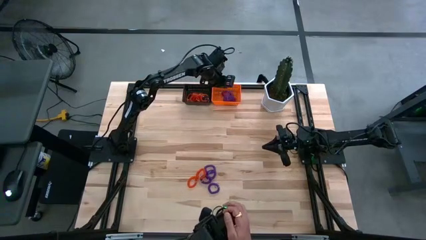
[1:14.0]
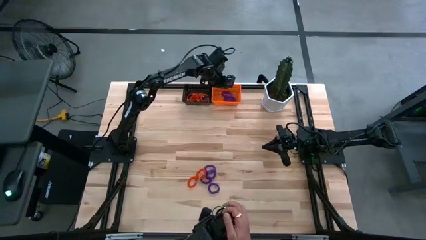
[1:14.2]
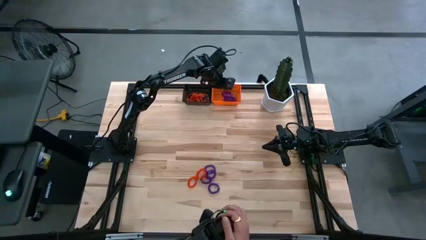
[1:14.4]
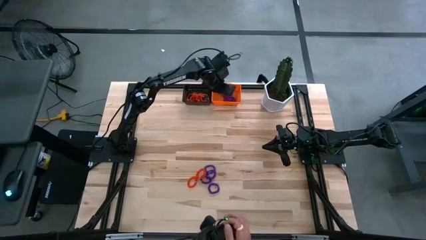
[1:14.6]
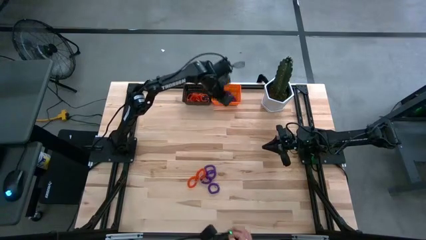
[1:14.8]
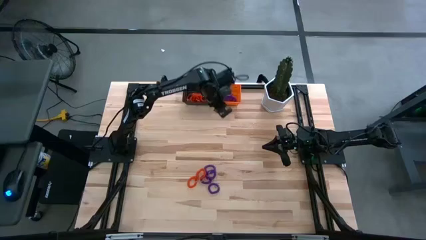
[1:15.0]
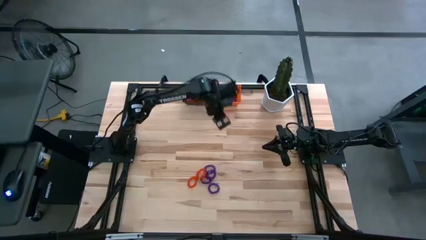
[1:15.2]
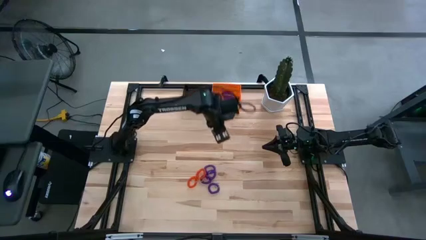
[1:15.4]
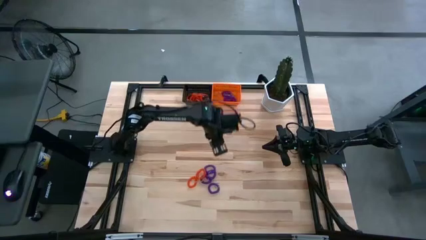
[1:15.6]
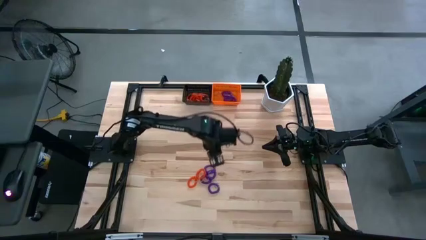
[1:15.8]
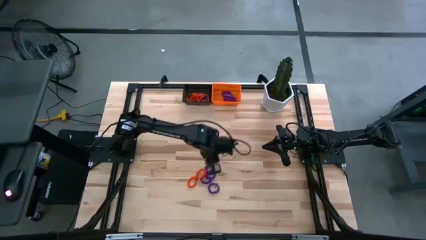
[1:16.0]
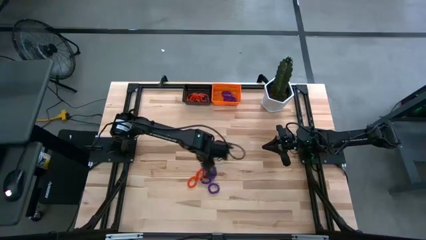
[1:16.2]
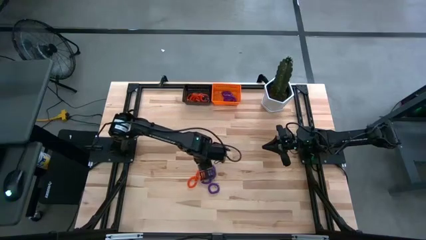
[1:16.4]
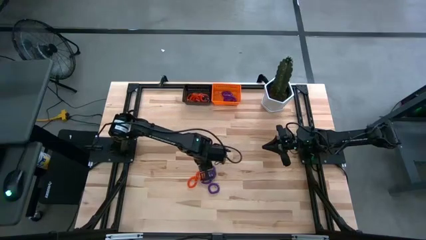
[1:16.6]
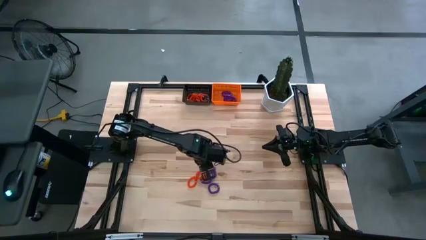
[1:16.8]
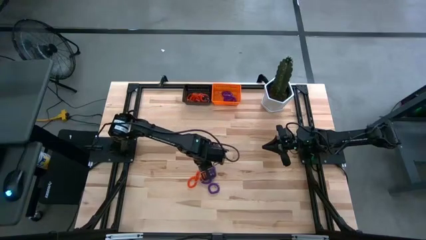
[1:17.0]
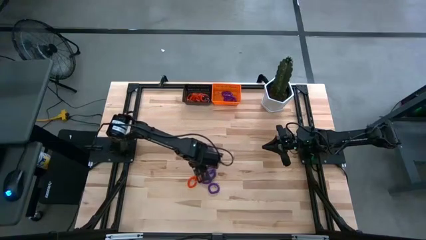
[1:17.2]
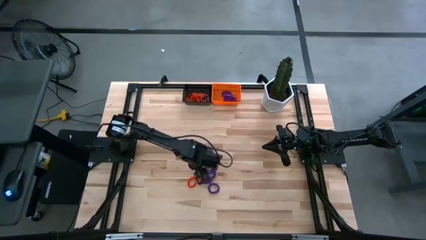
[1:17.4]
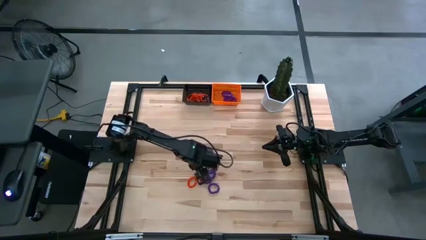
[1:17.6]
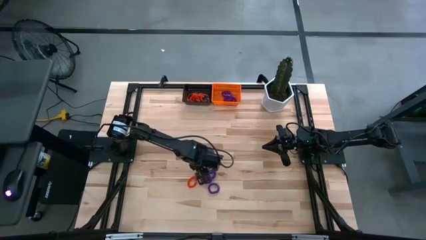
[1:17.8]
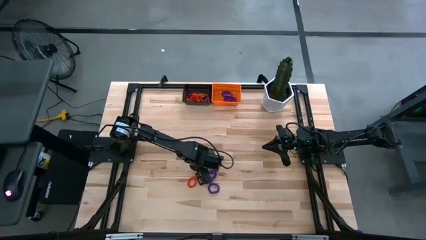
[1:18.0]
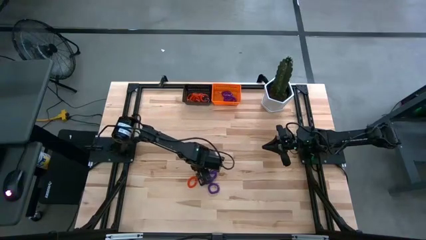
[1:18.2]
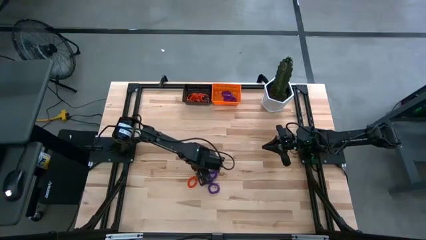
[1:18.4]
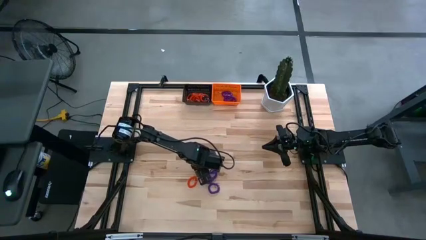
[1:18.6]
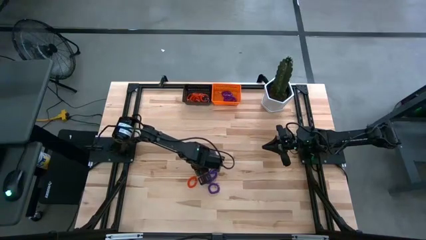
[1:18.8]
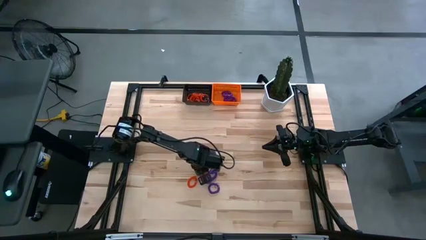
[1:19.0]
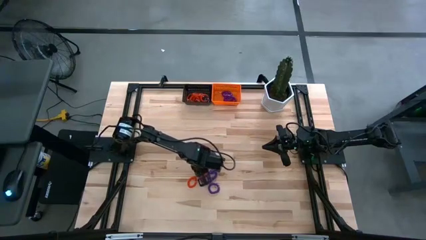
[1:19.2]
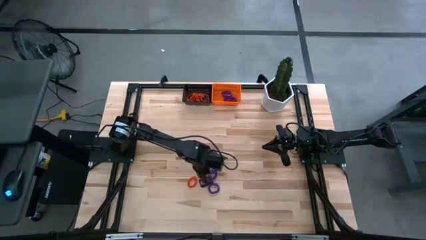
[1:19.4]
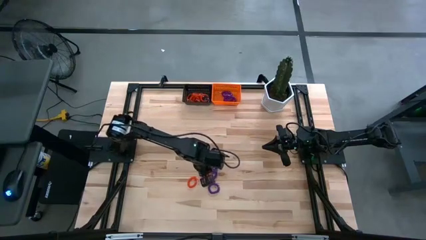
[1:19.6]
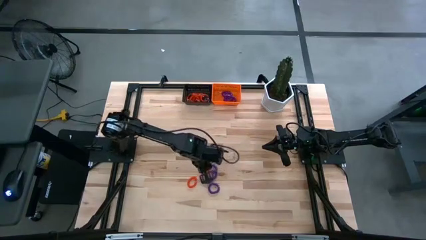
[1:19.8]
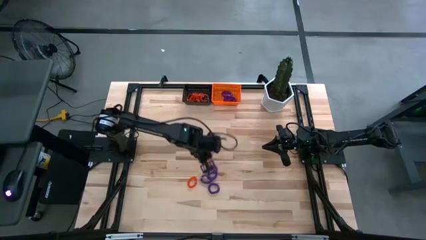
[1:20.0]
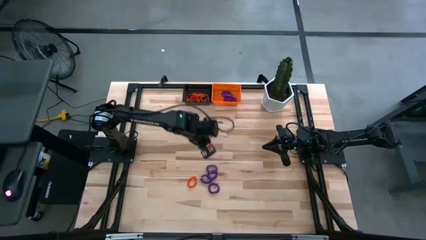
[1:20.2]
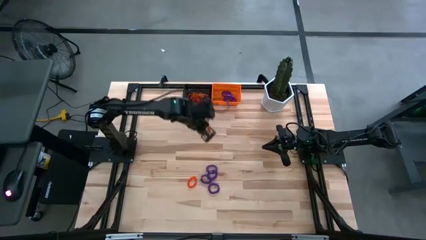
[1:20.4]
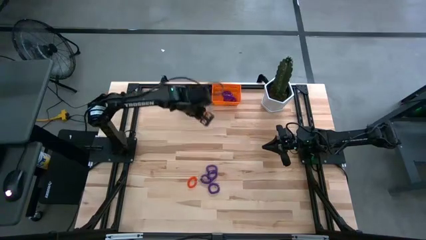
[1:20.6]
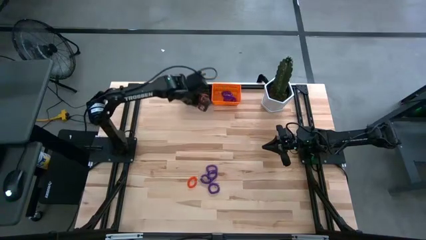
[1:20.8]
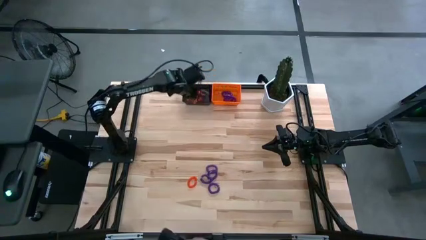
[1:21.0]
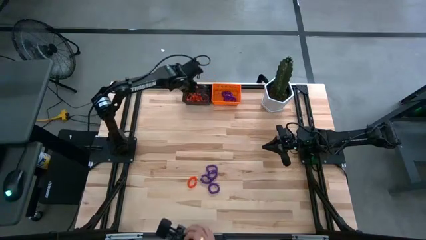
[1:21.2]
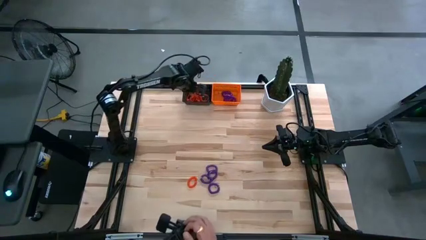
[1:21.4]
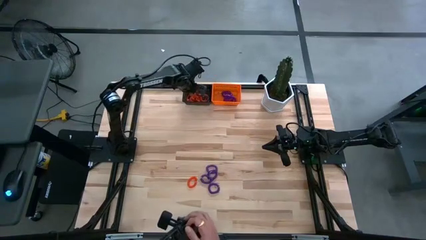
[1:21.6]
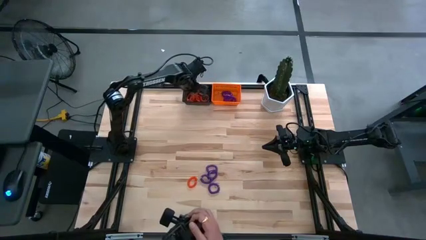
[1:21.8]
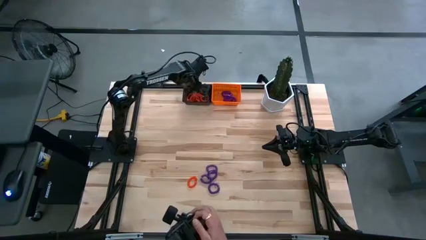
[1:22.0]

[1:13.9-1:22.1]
Task: Sort spring keychains into baskets
Put the orange spring keychain into the black basket

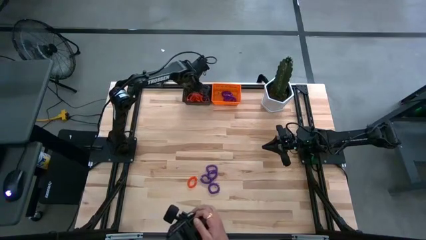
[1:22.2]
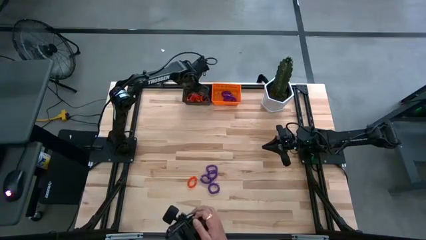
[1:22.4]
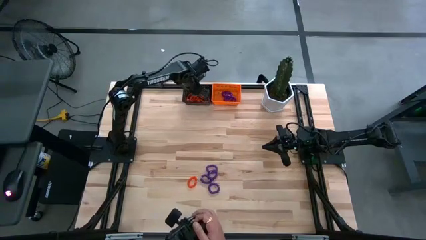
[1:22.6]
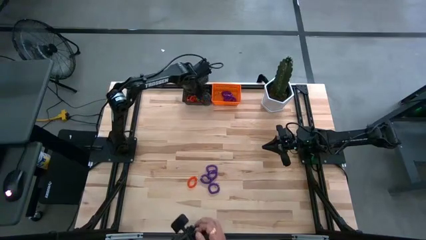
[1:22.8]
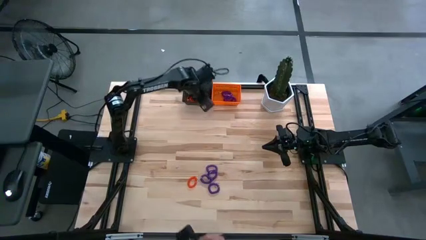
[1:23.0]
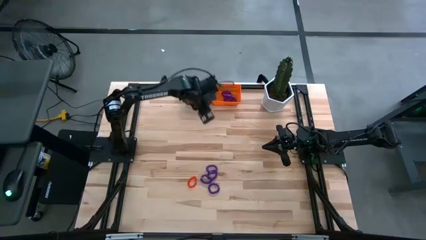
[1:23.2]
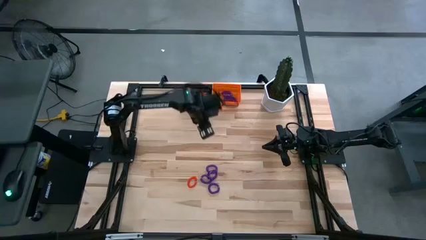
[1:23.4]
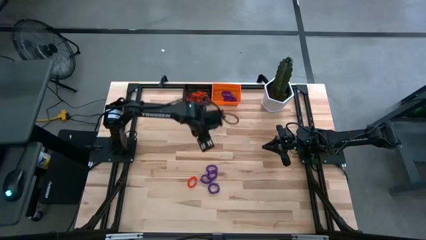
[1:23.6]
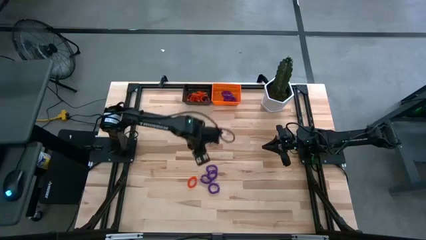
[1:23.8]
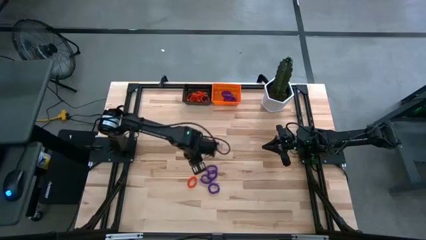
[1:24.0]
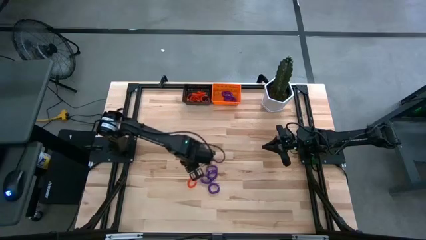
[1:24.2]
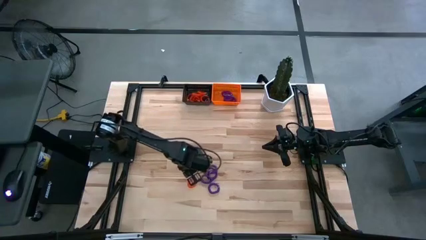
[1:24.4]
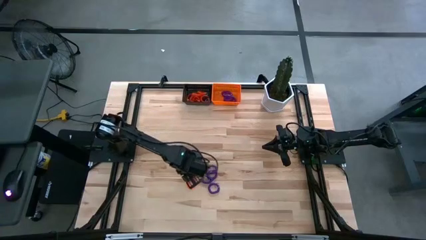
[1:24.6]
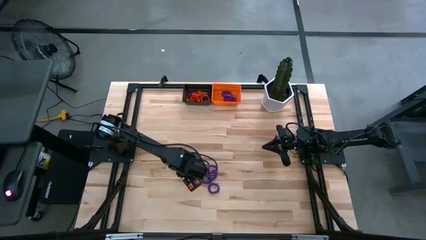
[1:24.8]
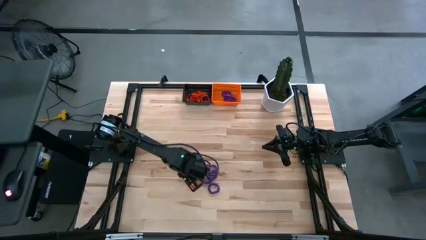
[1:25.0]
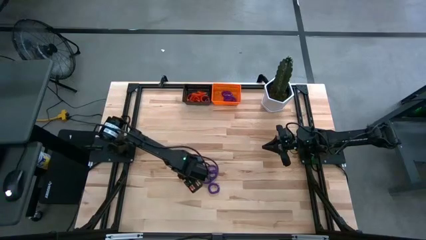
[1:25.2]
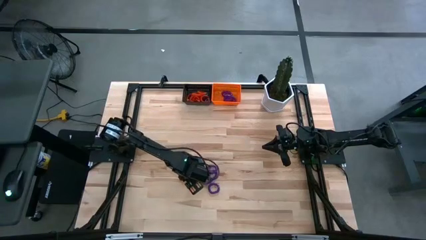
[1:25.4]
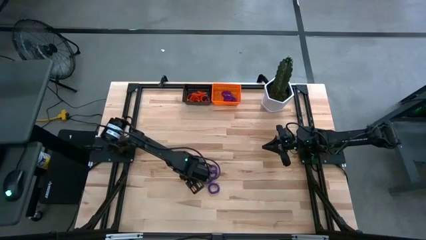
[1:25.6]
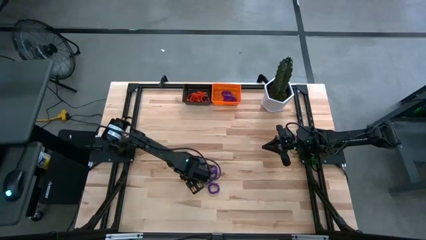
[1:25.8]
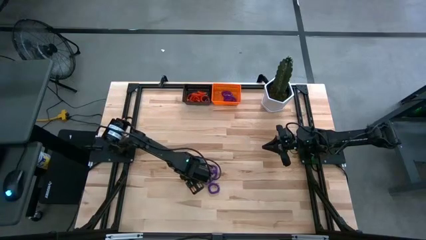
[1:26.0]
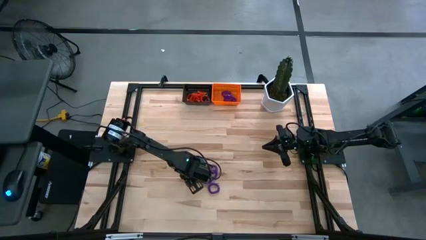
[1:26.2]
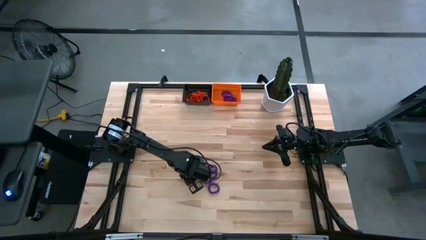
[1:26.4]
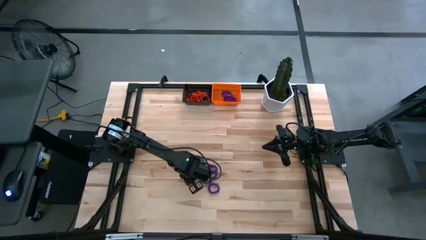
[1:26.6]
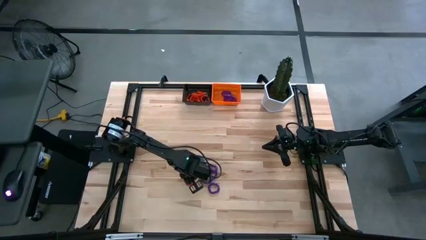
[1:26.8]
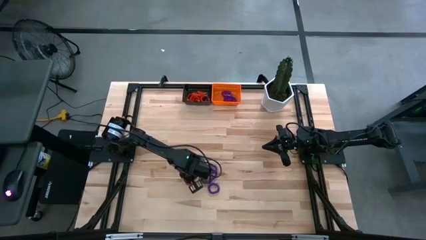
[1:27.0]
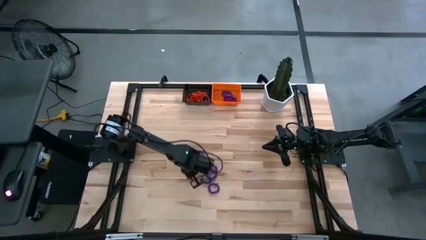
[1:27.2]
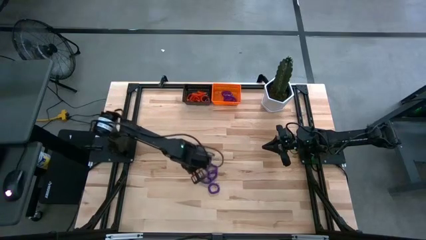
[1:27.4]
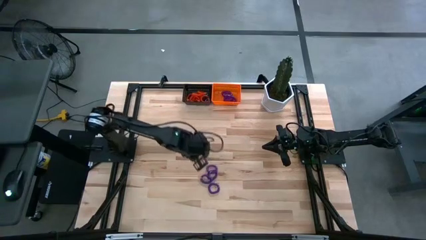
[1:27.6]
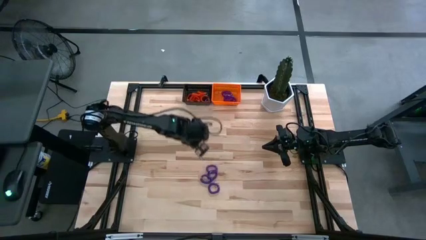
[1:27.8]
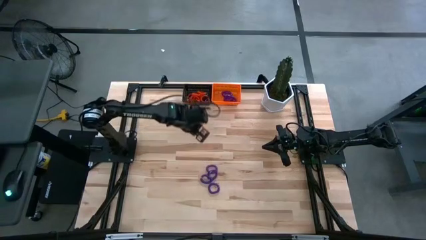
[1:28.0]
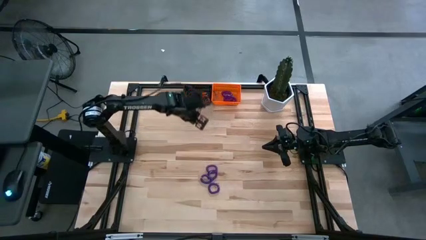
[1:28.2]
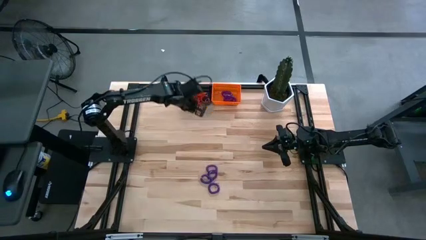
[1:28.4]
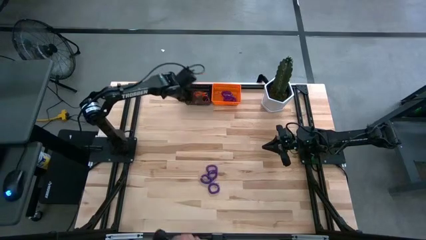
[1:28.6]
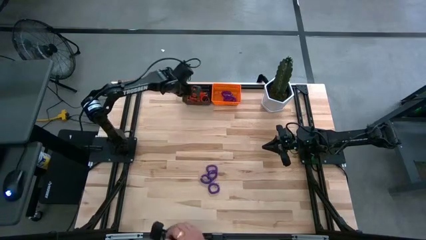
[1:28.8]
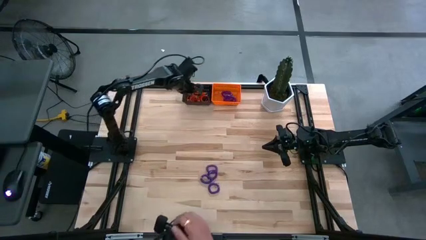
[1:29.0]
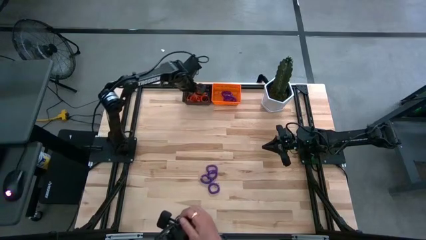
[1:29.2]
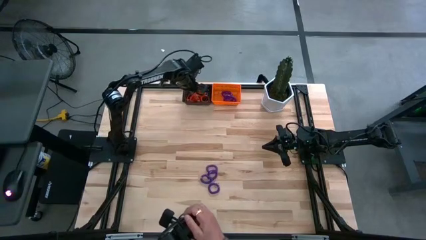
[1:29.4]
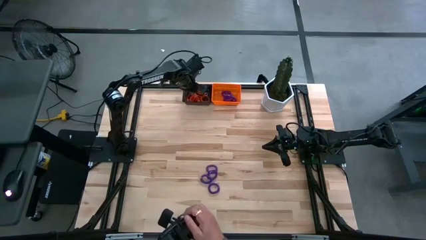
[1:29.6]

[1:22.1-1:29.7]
Put the orange spring keychain into the black basket

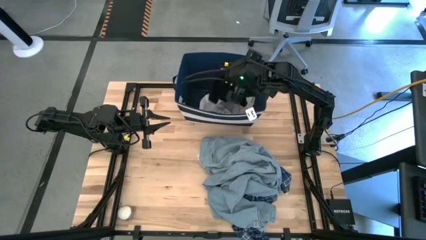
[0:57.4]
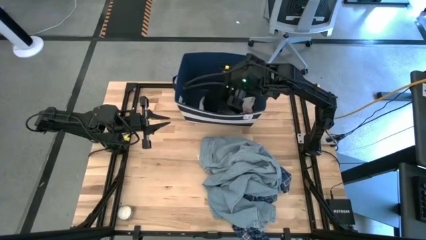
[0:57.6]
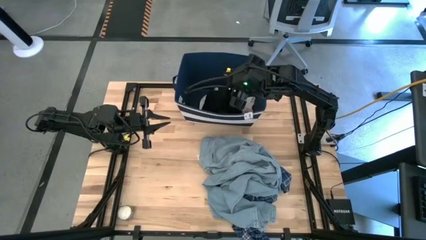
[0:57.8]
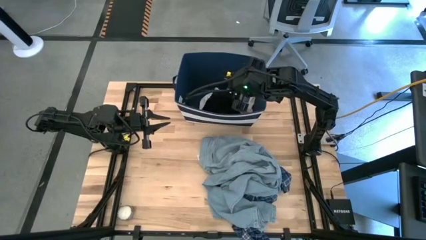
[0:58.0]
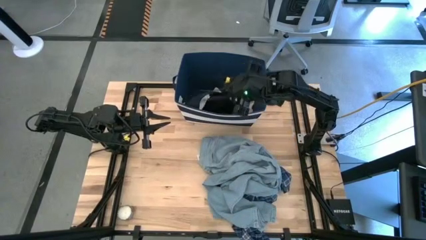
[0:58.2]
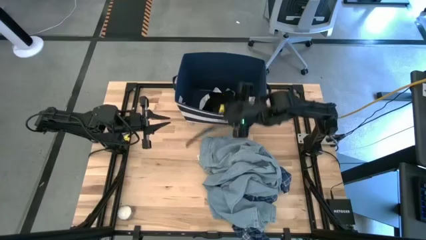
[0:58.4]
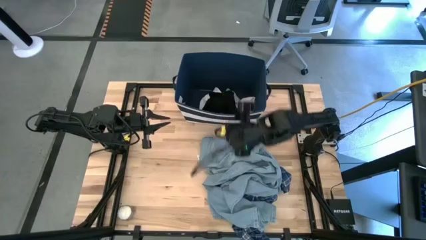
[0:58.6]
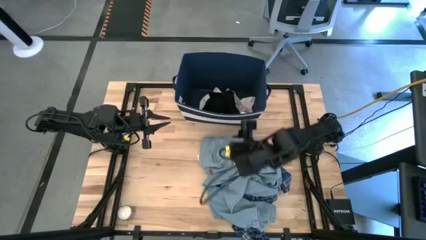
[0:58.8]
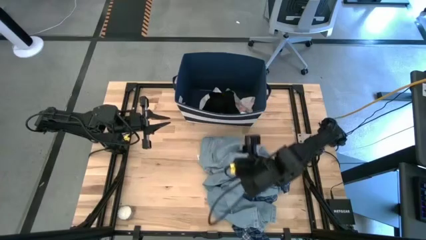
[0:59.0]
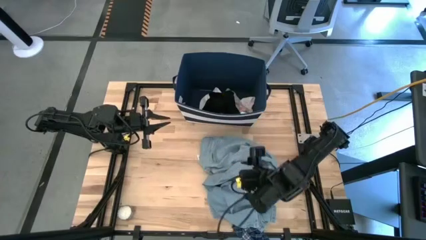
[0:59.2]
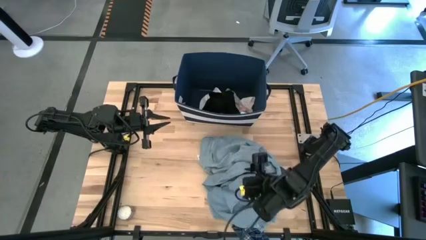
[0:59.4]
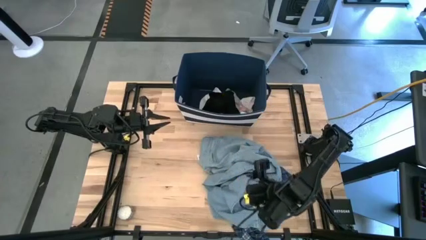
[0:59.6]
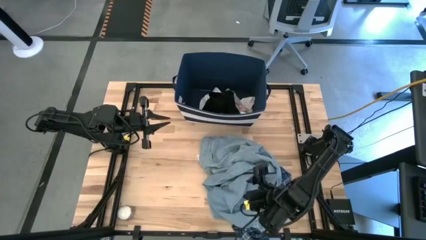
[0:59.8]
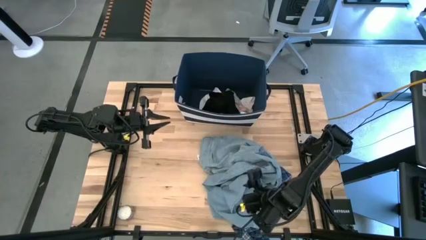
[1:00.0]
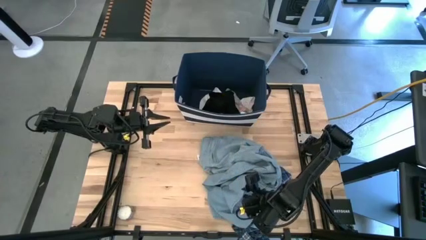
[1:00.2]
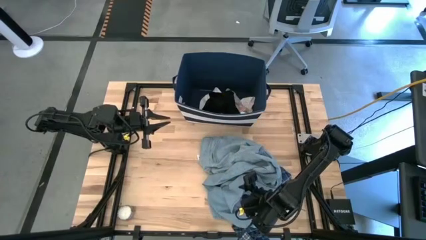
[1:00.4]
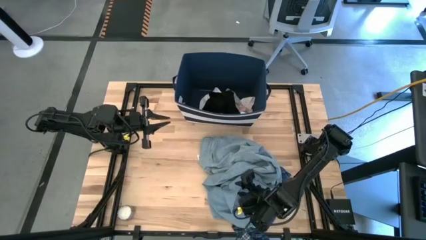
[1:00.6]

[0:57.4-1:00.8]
Task: Sort clothes
Put the blue jeans into the blue bin
